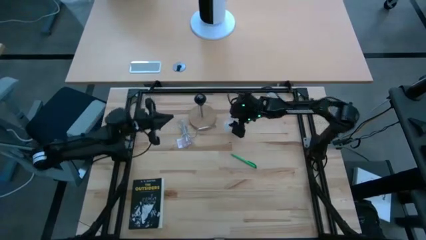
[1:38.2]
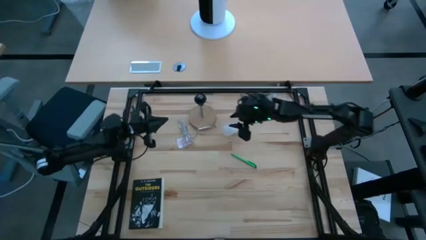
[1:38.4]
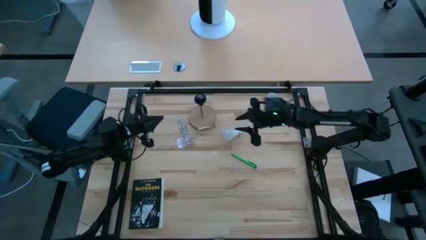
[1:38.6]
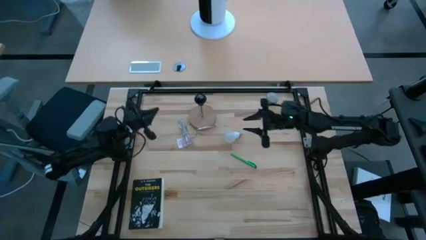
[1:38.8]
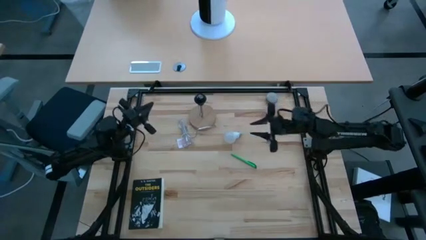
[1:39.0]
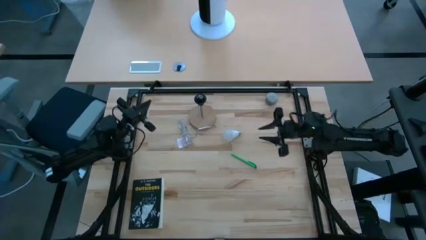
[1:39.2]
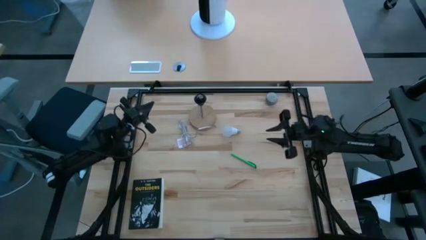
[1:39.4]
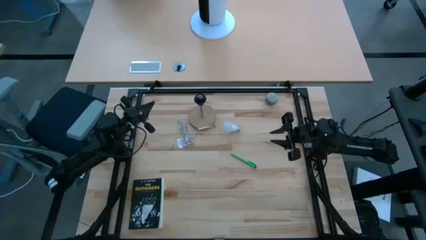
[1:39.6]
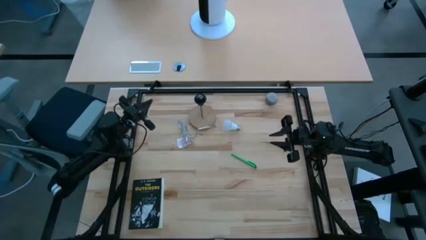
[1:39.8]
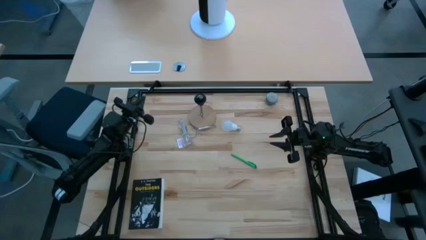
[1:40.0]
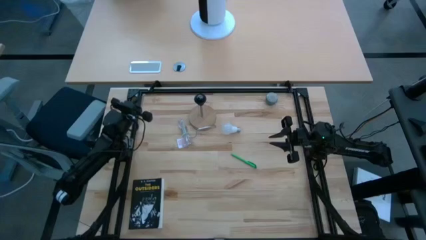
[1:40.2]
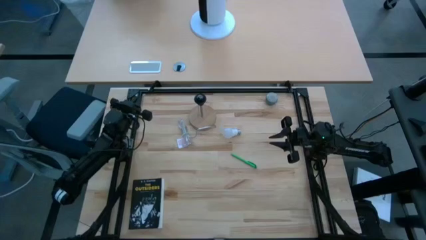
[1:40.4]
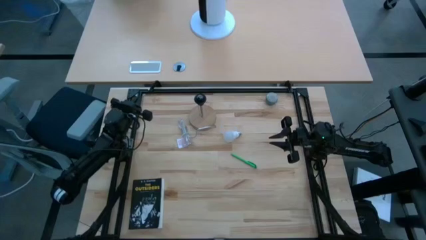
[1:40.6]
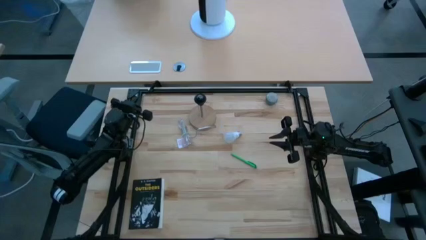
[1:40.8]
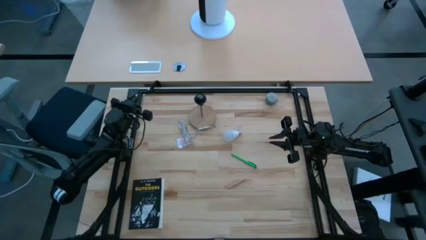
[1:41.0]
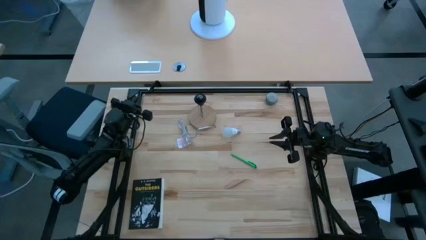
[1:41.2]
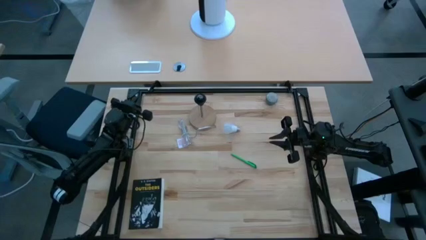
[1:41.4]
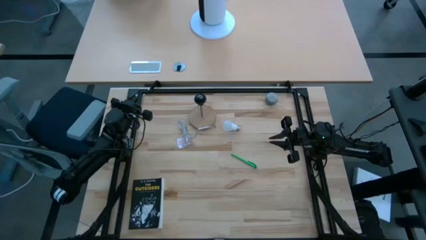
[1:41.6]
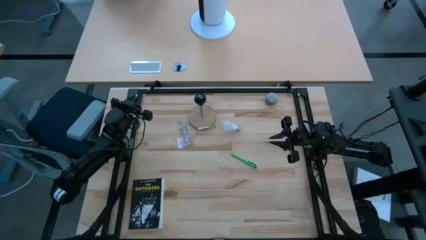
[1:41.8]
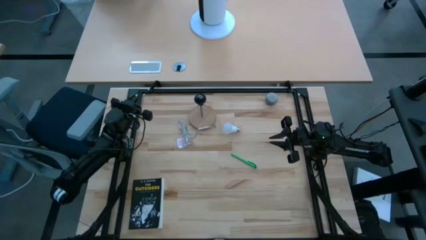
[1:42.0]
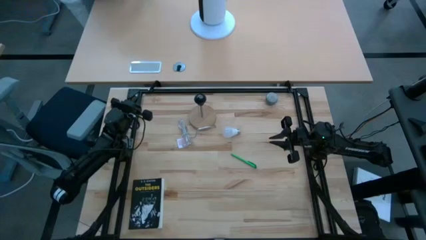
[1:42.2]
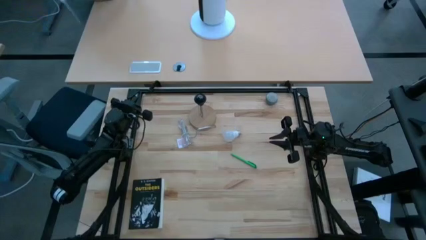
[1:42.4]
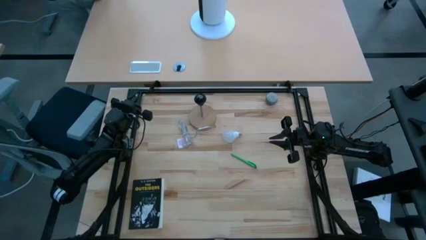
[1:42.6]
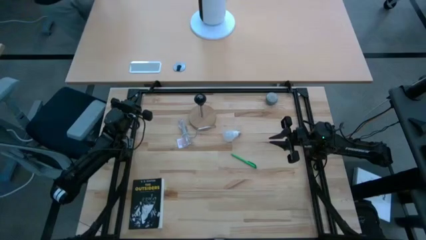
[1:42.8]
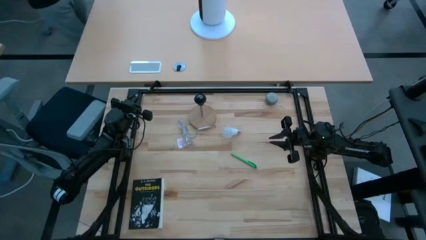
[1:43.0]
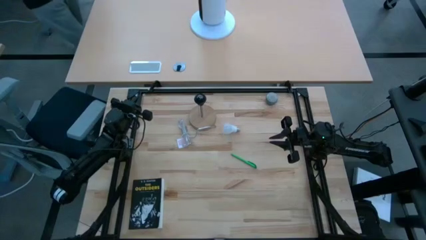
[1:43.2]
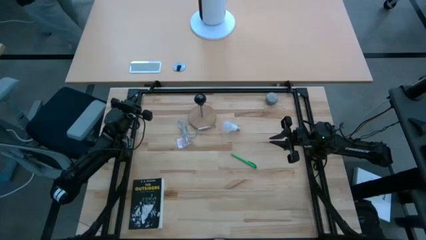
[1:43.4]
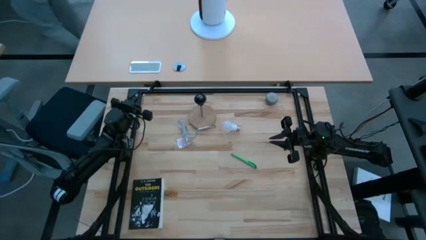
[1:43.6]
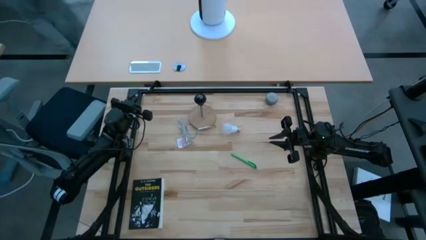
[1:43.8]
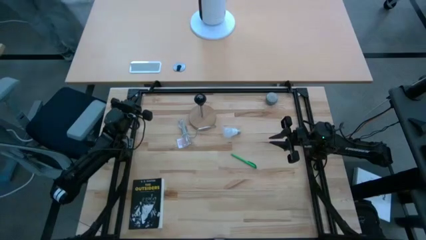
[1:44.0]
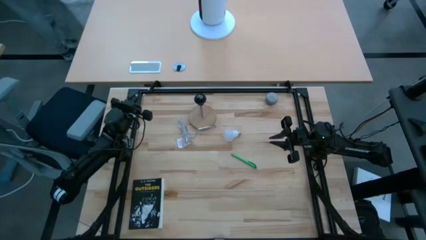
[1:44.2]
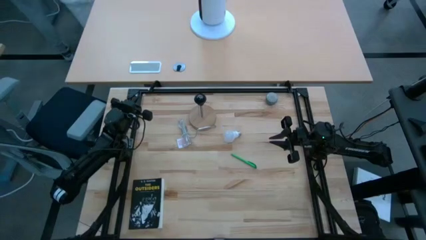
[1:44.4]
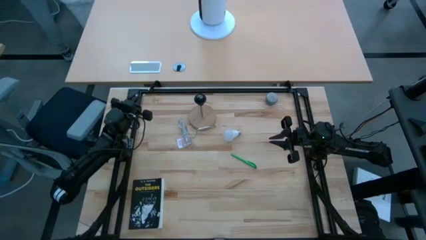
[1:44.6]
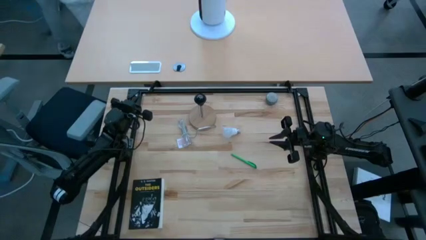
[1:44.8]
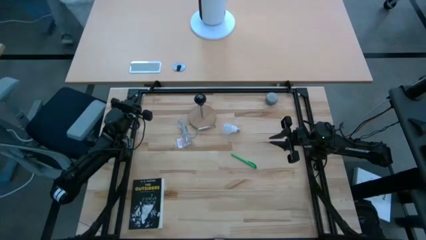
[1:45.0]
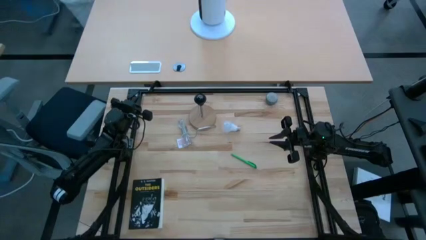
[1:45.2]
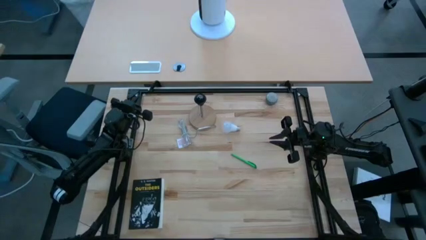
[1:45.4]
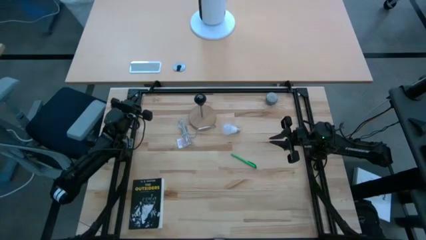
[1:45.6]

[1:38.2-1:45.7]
Task: Screw lightbulb
Return to Home Position

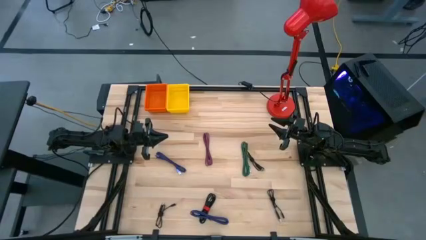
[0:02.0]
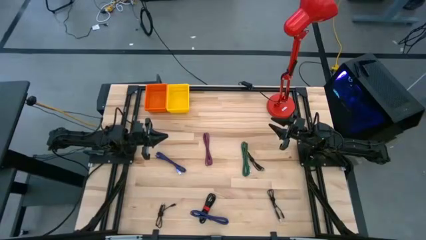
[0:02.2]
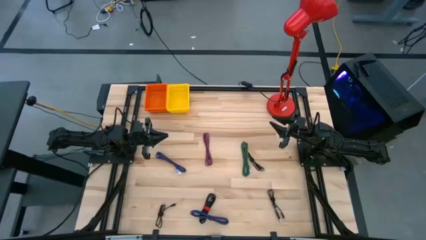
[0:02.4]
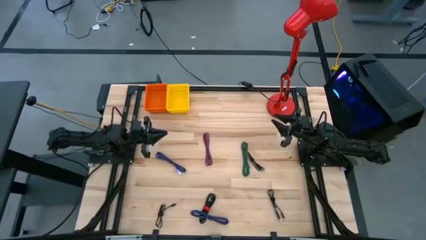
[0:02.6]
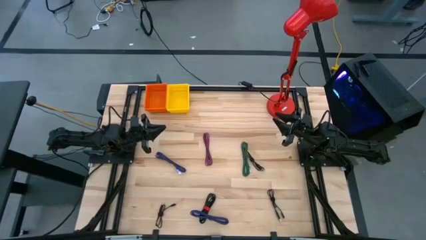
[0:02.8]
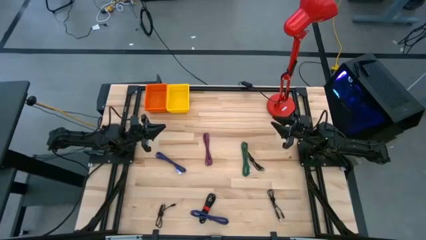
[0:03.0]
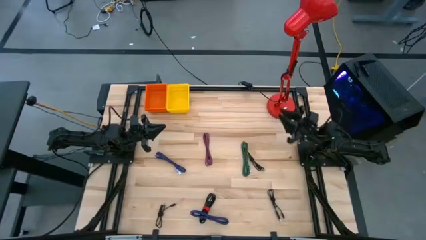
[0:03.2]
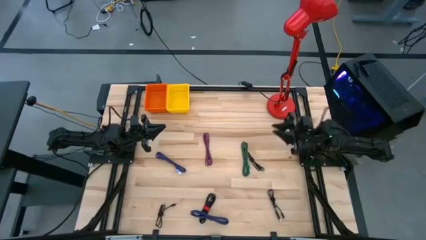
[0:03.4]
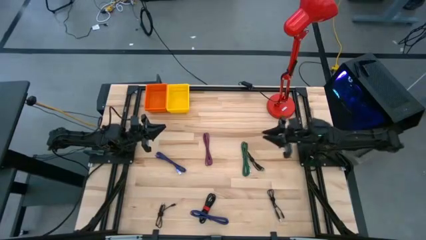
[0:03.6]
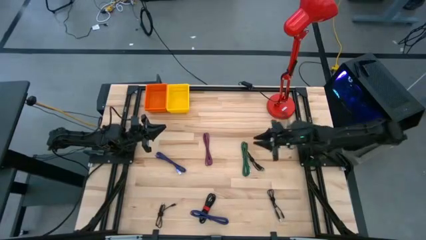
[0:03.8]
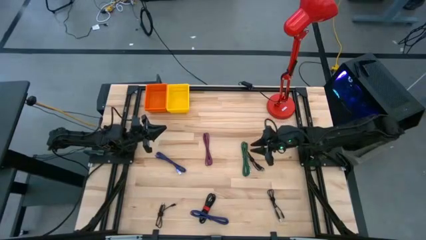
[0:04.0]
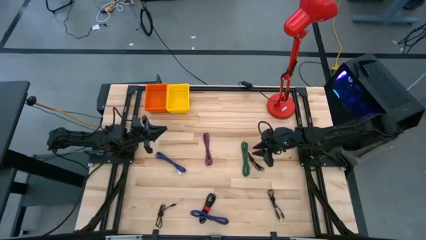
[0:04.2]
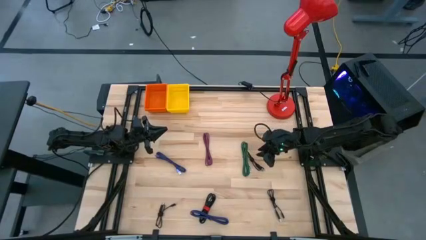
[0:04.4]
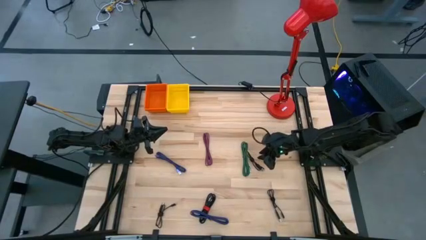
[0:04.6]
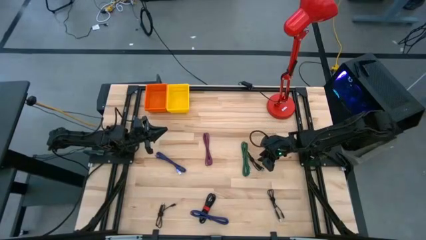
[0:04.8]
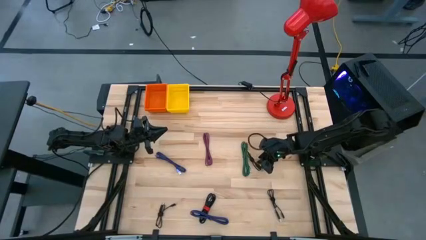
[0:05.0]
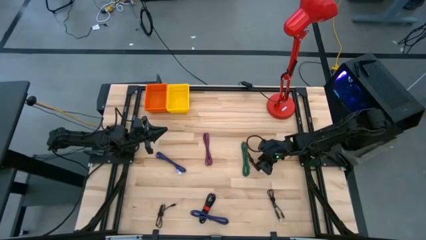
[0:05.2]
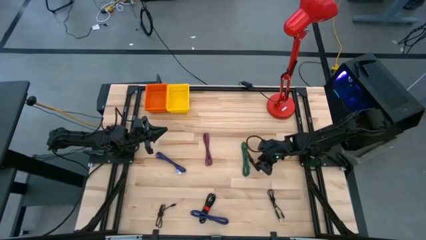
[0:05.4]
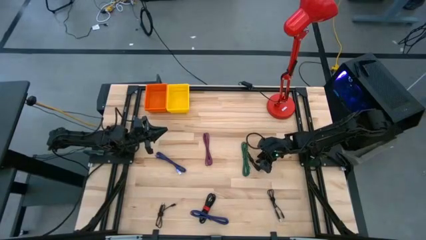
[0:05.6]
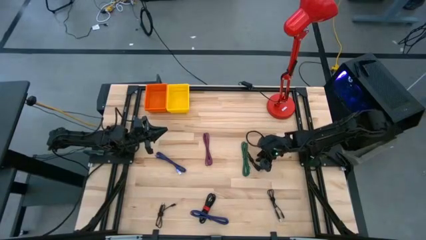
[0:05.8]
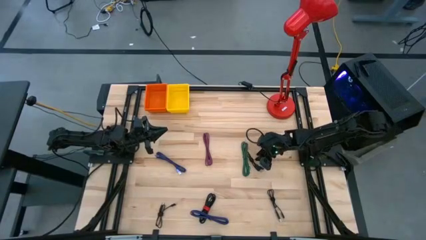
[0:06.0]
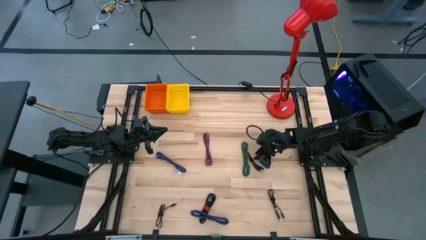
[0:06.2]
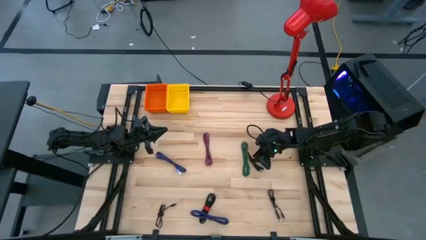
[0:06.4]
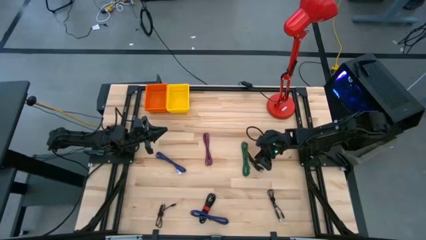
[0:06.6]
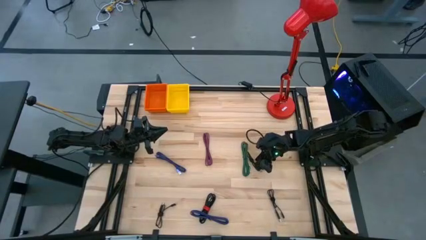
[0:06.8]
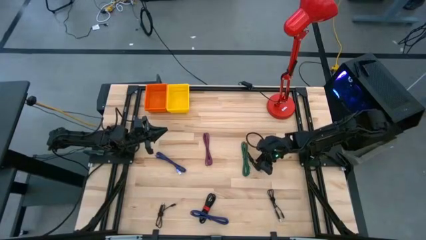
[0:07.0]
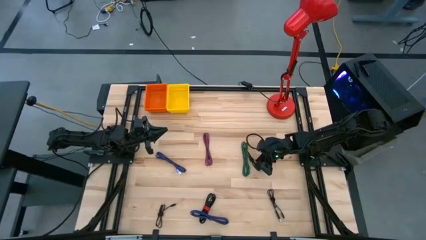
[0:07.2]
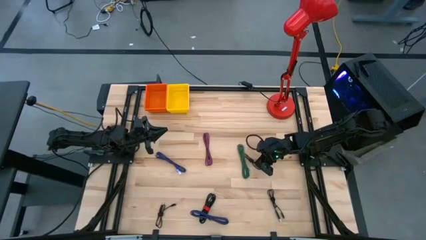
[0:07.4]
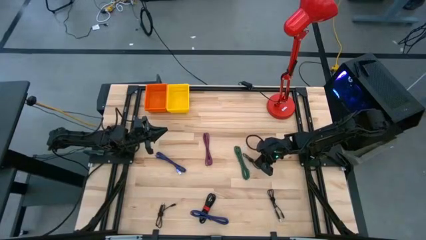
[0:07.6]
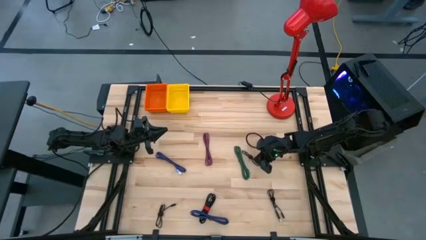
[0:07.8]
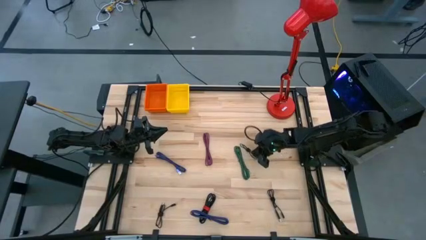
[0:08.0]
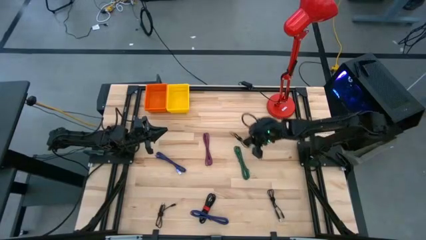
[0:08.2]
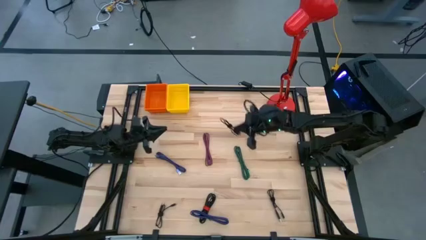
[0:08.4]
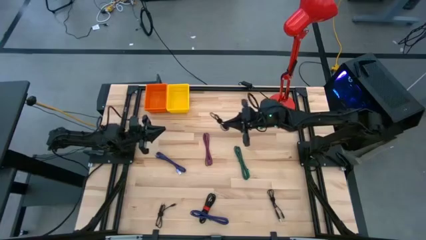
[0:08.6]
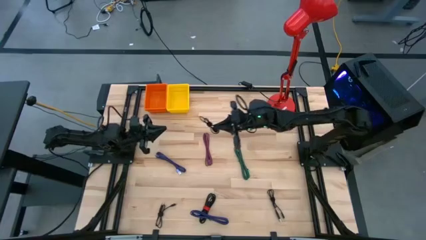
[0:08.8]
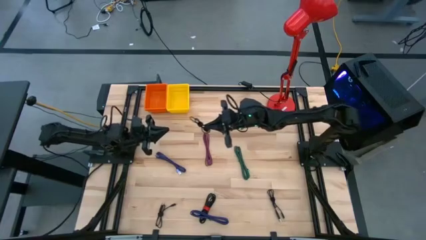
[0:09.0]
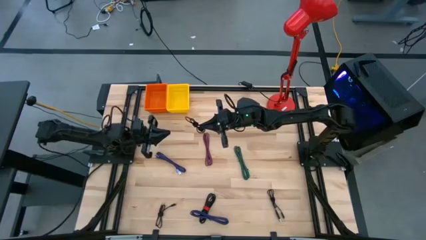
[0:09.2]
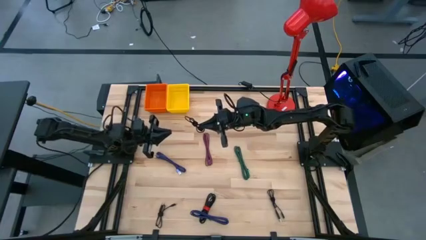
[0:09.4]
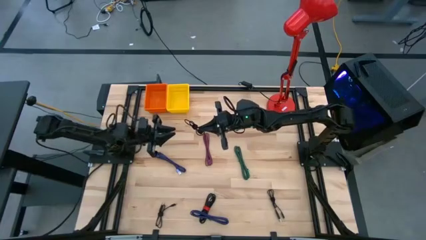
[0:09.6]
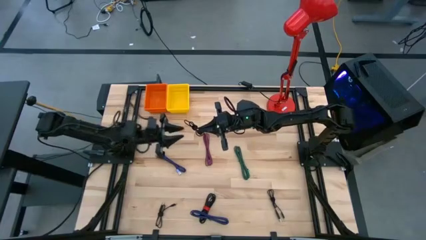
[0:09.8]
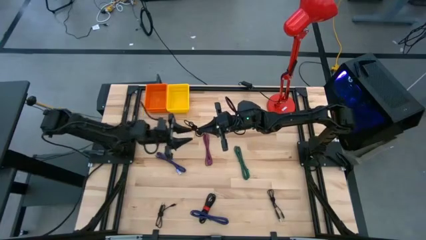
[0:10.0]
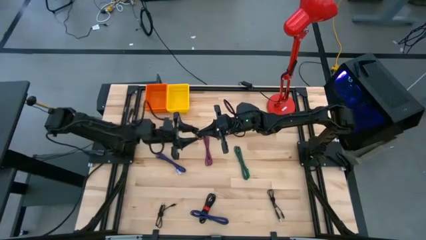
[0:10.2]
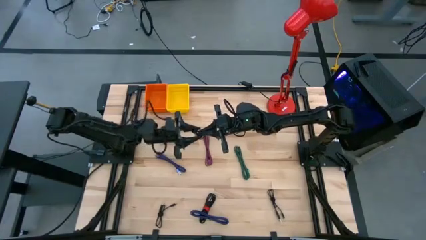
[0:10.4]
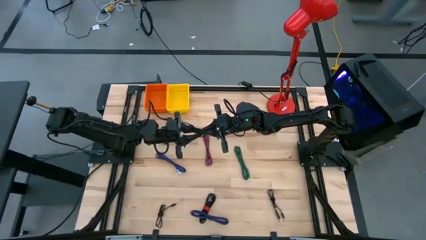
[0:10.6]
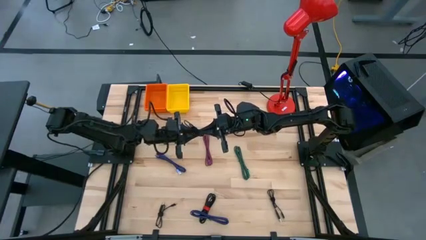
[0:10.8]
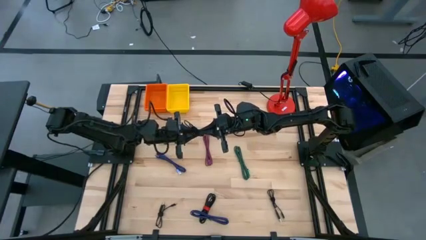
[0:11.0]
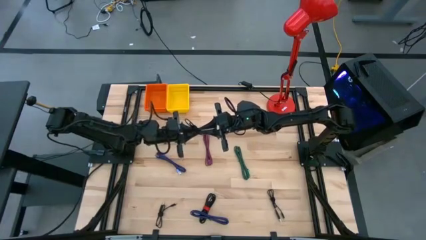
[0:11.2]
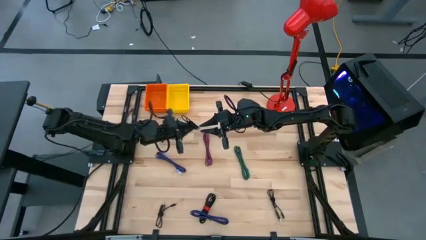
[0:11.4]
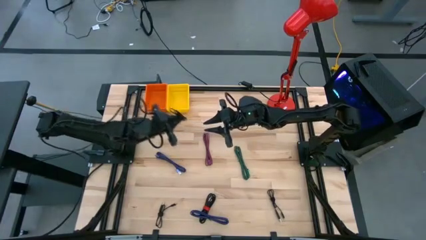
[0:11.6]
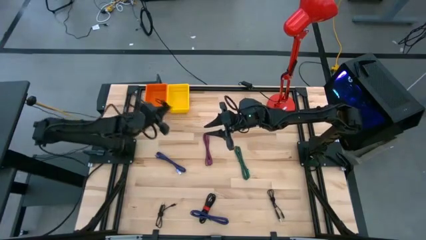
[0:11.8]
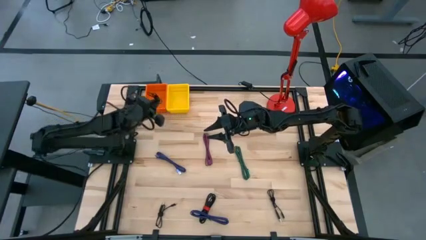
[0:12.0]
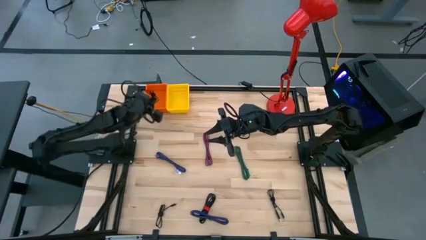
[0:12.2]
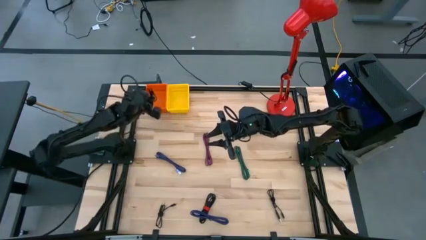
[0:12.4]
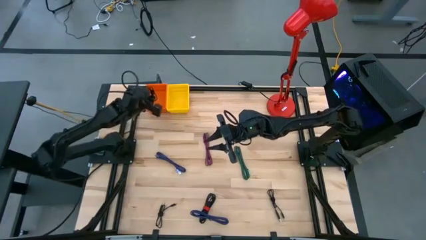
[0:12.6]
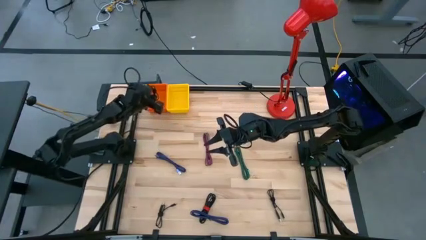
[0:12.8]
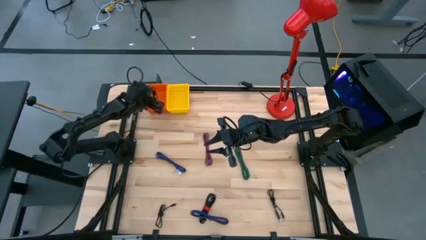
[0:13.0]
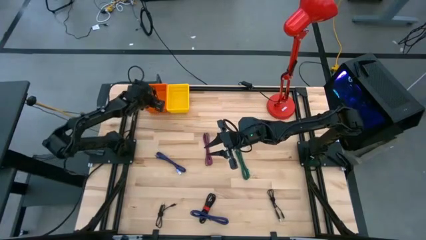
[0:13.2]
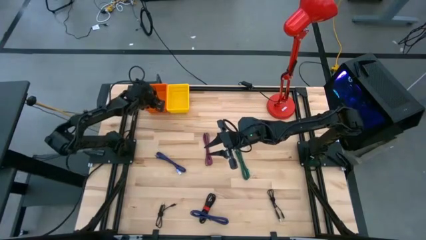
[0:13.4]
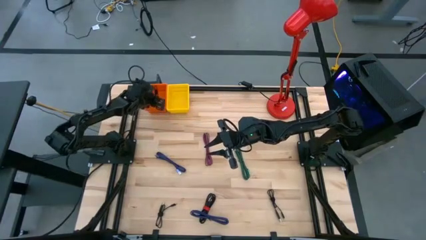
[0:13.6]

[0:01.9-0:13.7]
Task: Pick & Place USB Port
Put the black USB cable into the orange bin
